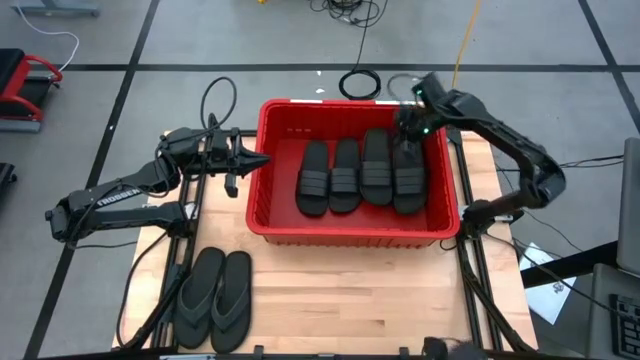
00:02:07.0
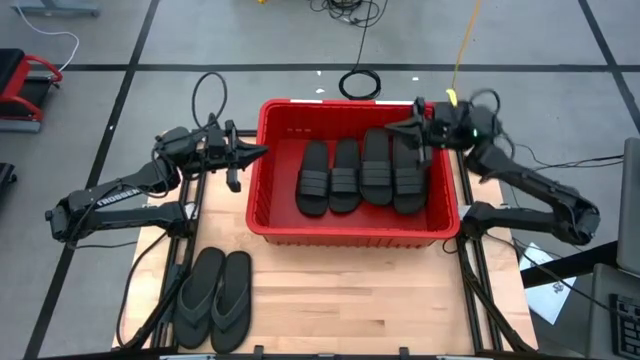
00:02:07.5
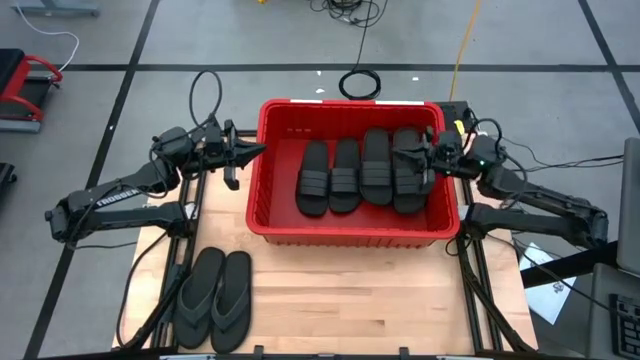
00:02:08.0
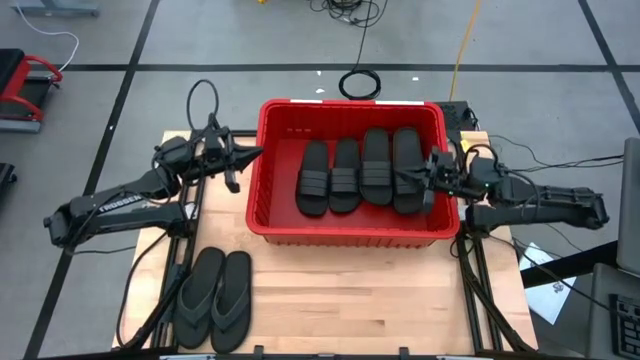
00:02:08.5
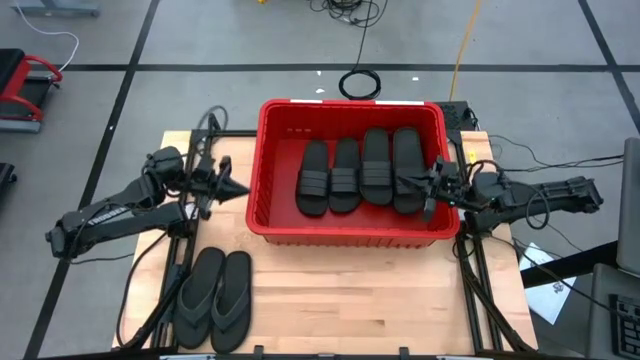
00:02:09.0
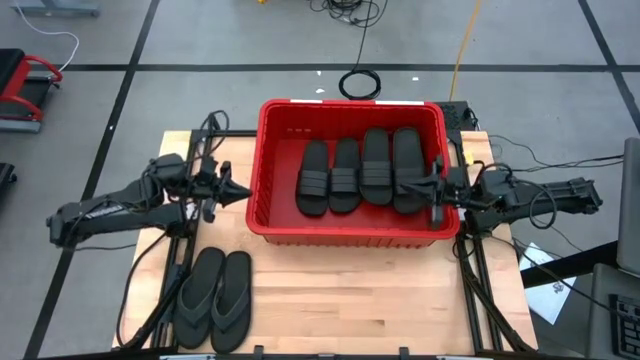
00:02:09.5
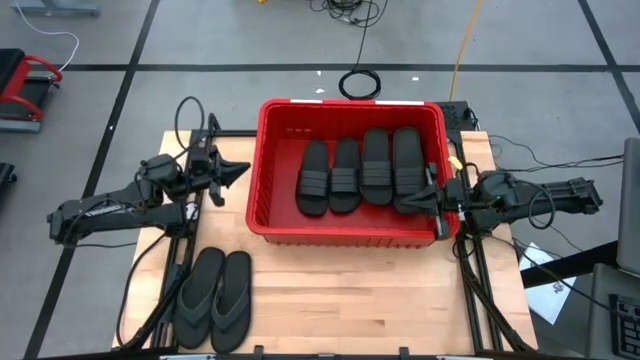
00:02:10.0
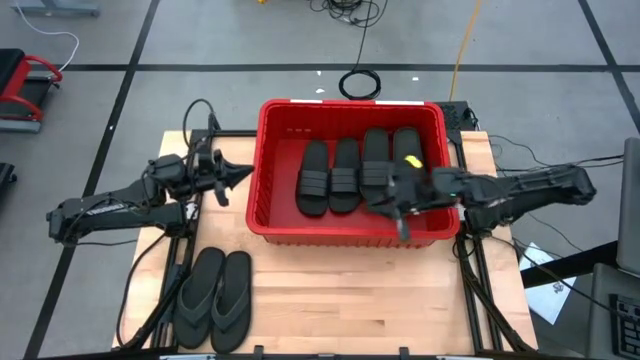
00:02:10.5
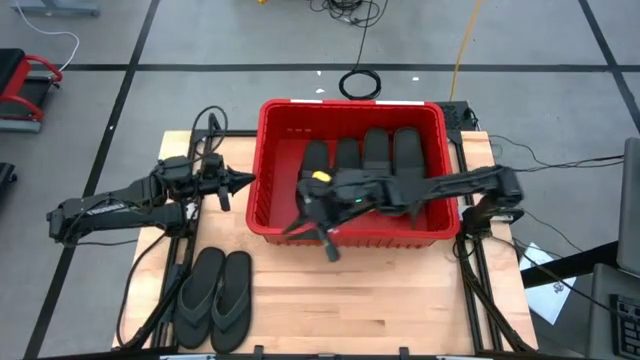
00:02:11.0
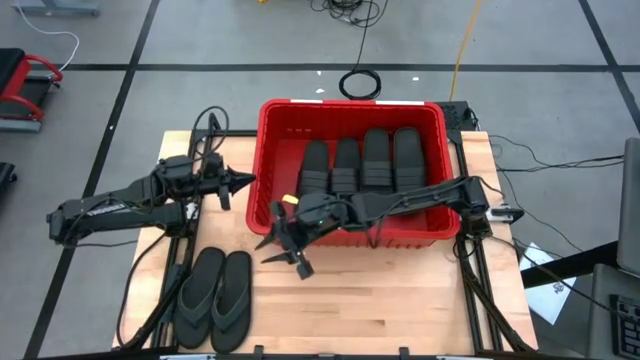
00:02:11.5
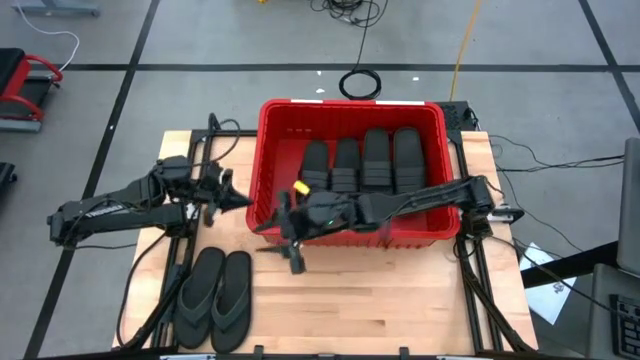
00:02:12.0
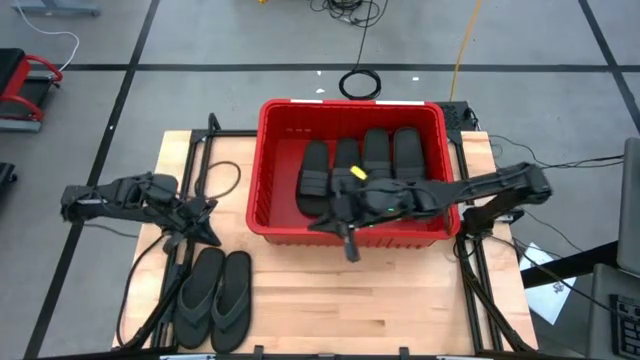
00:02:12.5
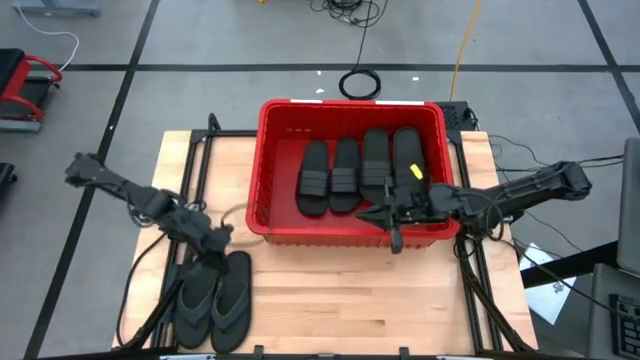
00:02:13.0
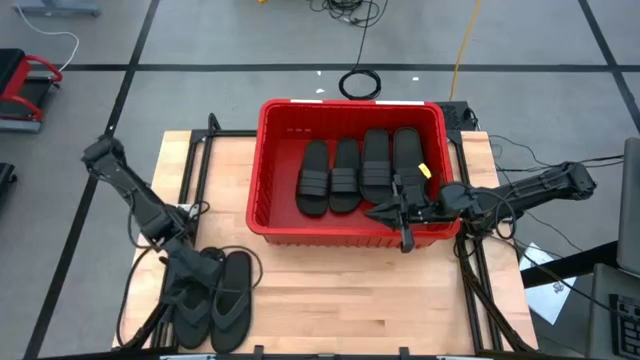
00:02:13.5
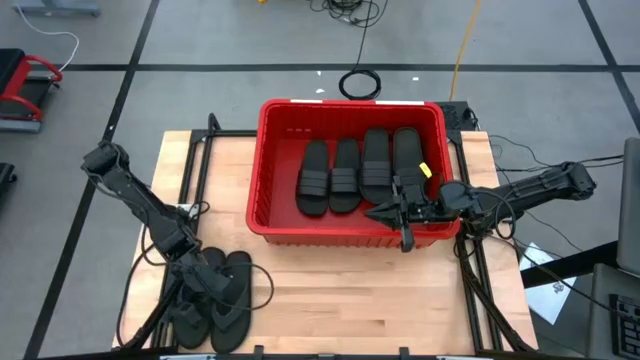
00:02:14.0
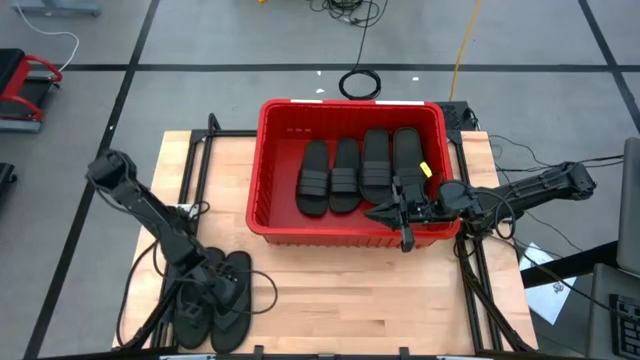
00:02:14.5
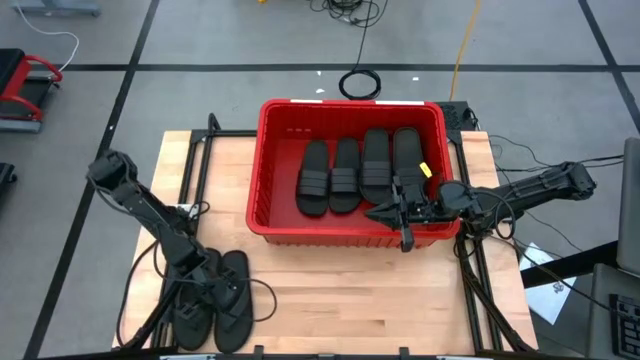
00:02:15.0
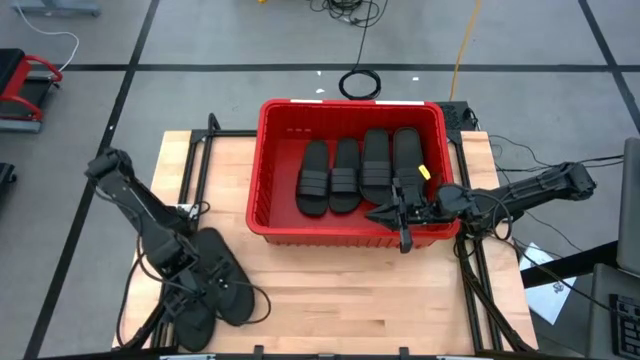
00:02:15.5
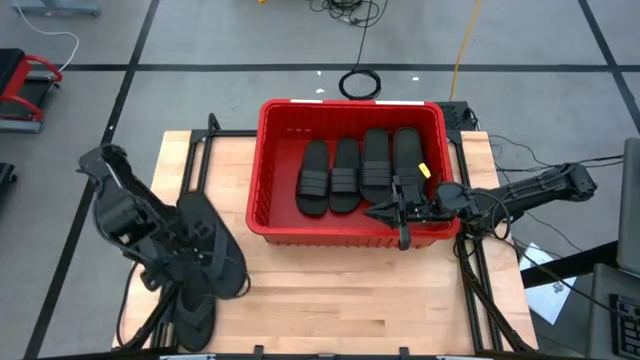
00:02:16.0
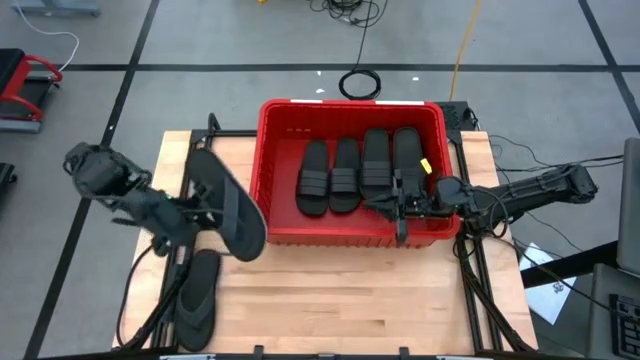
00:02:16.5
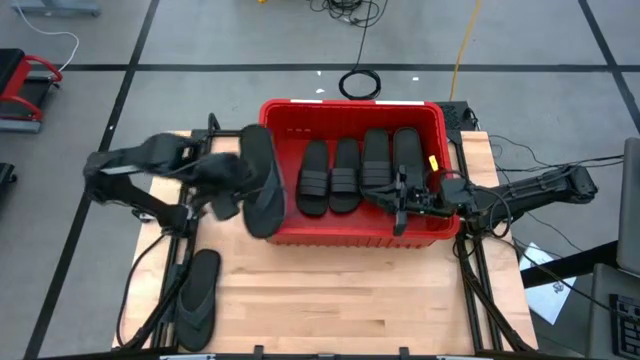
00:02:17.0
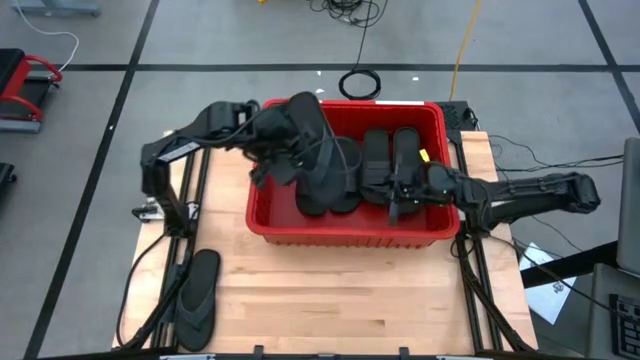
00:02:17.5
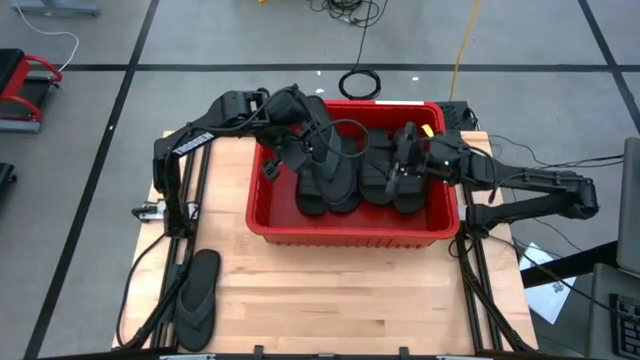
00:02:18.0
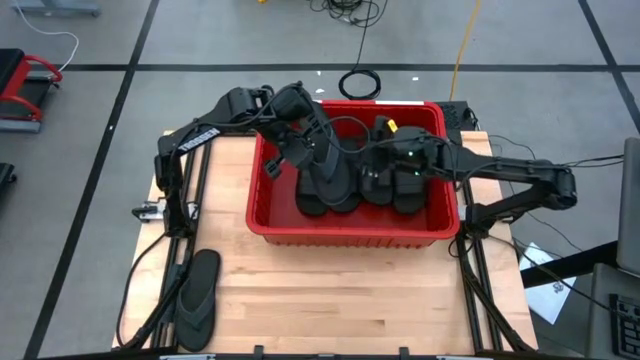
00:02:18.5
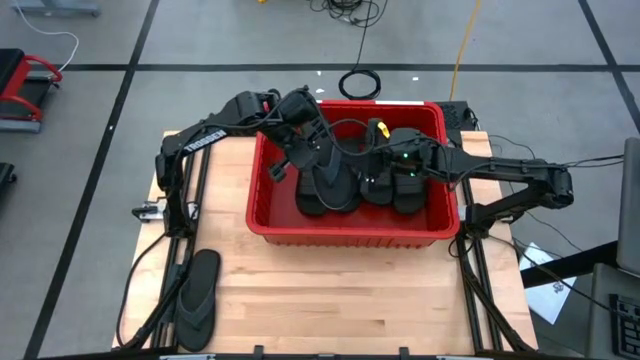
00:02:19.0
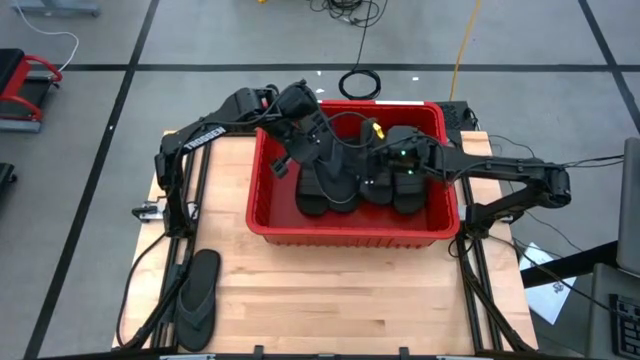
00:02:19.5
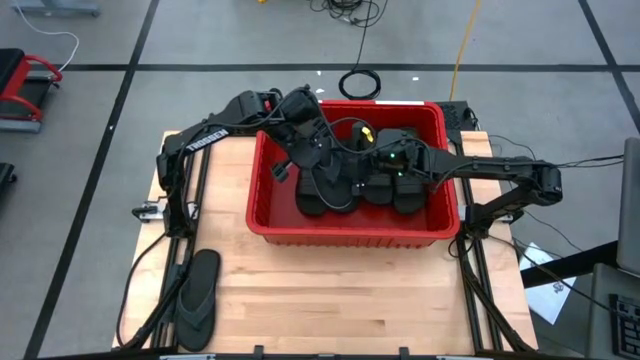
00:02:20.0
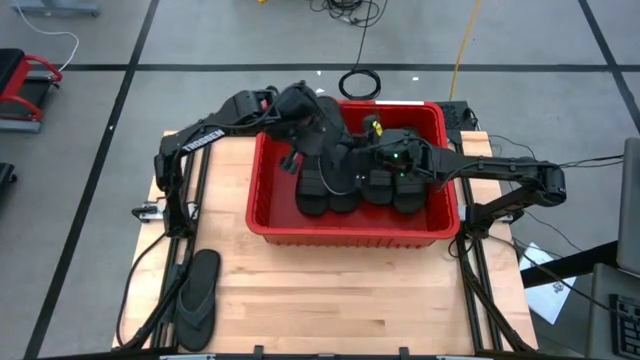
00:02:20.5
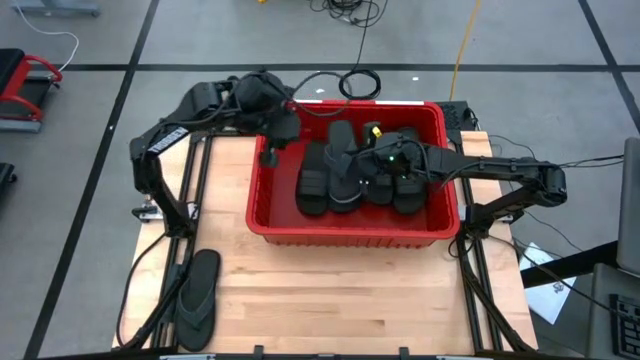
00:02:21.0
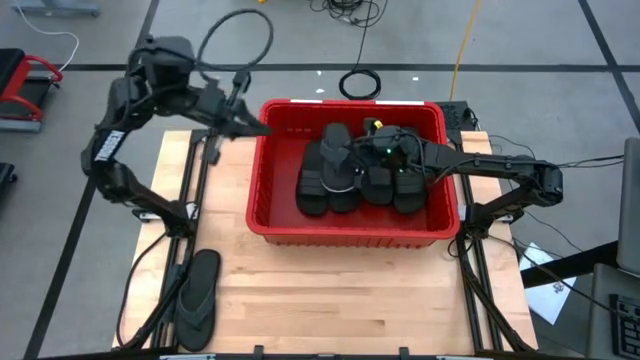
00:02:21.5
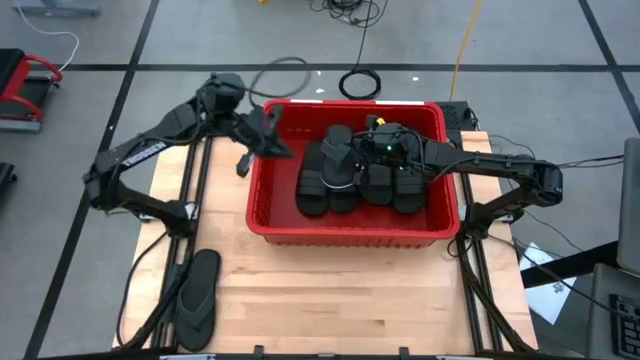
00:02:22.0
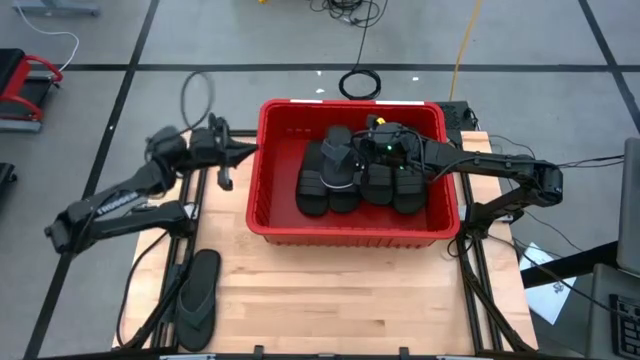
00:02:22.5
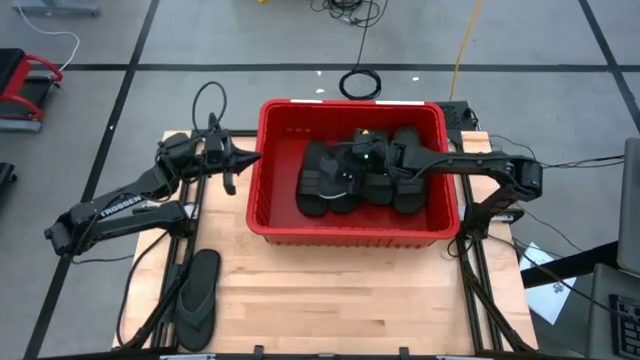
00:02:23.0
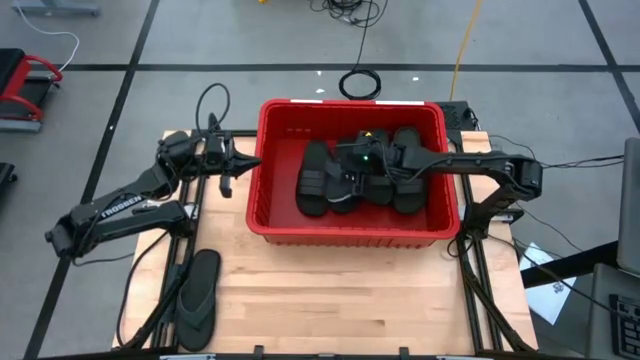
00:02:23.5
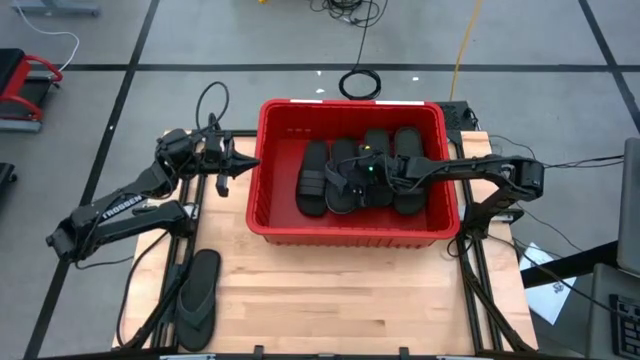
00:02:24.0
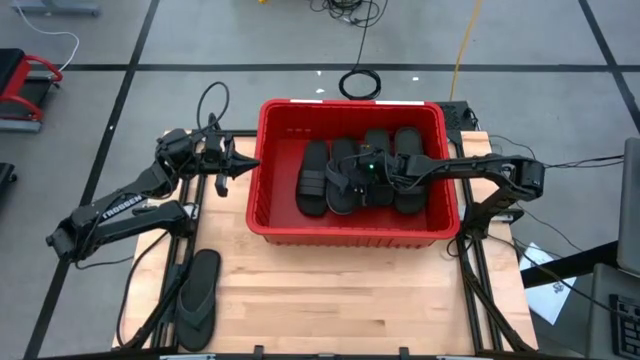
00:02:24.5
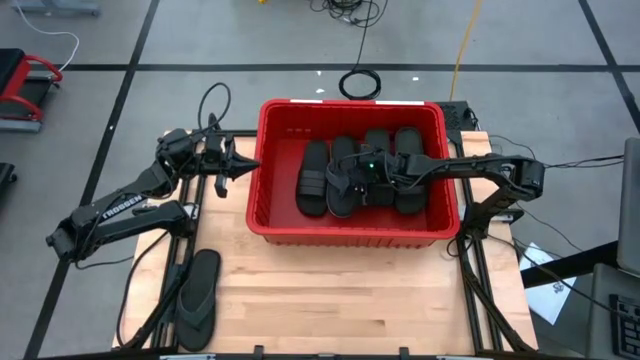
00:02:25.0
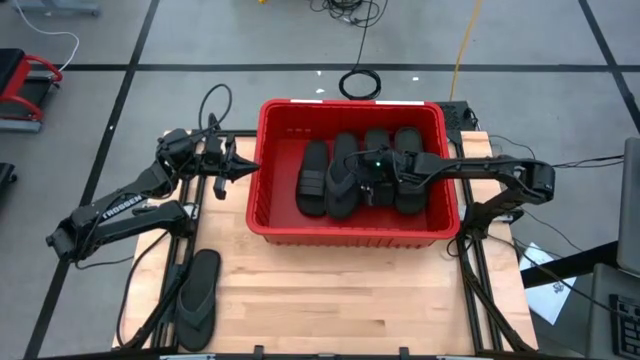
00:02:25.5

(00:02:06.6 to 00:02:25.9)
Task: Pick and place slides into bin
Put the black slipper into the red bin

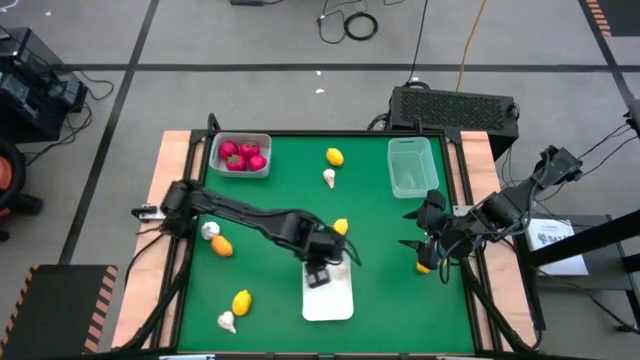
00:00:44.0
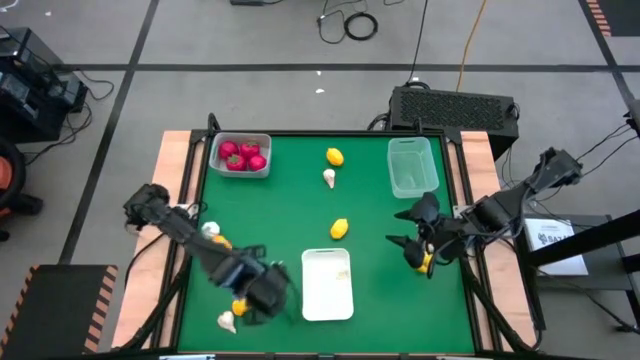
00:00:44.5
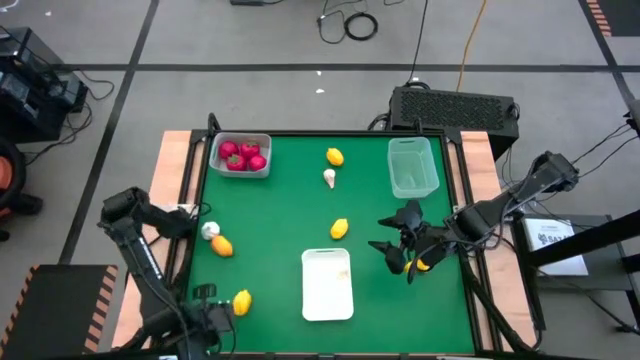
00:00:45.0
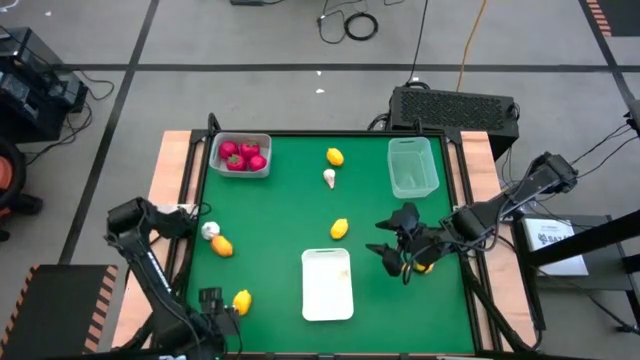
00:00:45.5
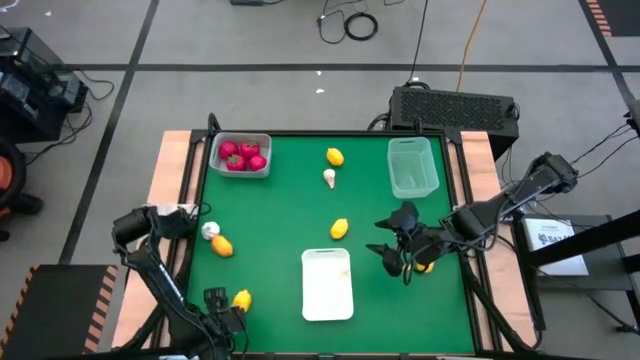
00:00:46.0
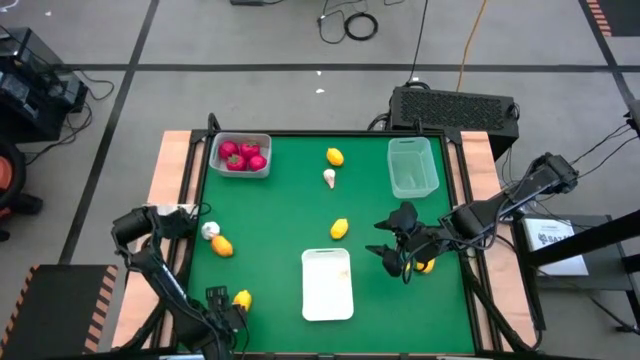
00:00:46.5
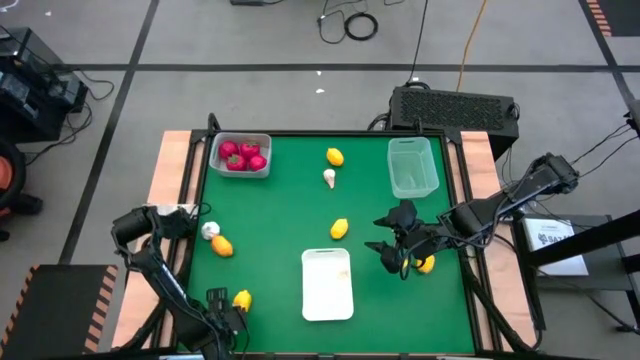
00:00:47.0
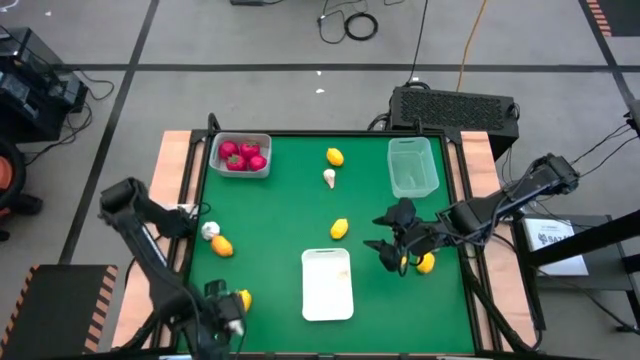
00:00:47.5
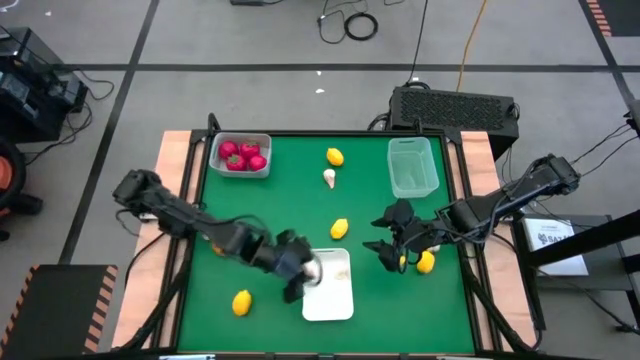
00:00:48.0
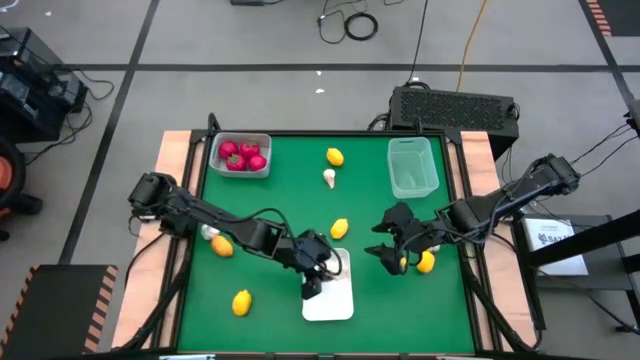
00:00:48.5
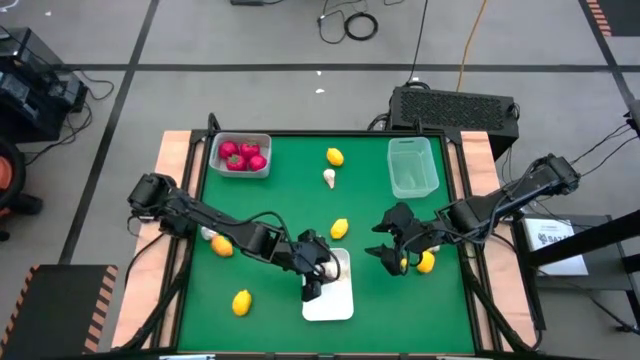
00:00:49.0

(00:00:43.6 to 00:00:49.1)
Task: Sort produce into baskets
Put the bottom left garlic into the white bin
